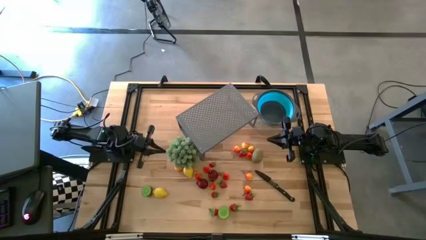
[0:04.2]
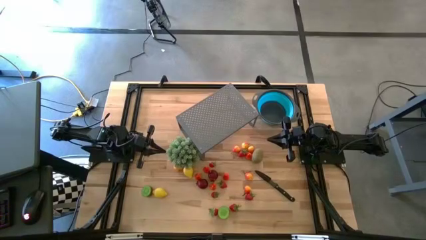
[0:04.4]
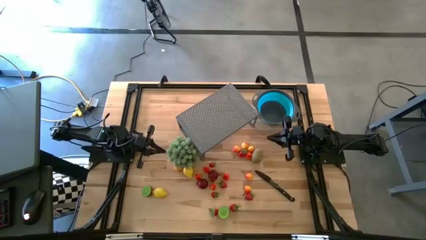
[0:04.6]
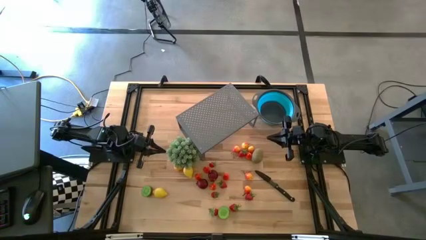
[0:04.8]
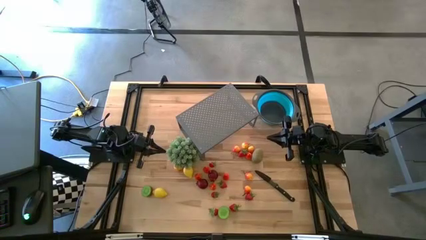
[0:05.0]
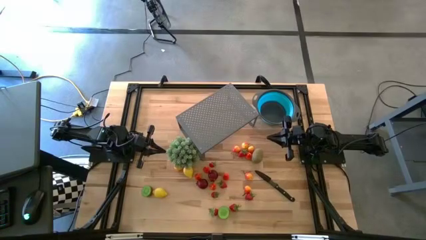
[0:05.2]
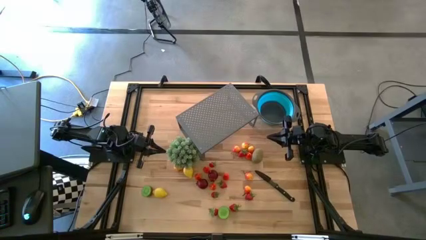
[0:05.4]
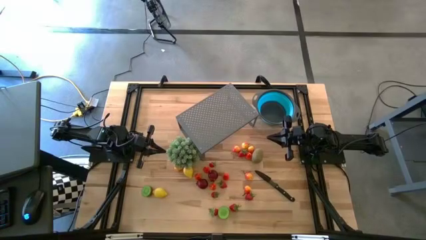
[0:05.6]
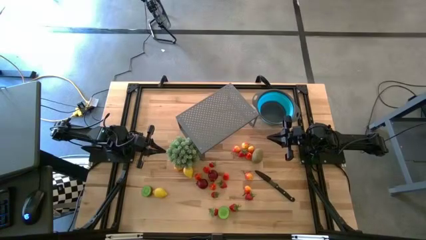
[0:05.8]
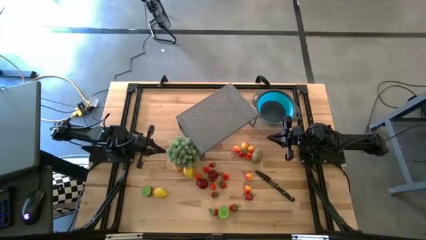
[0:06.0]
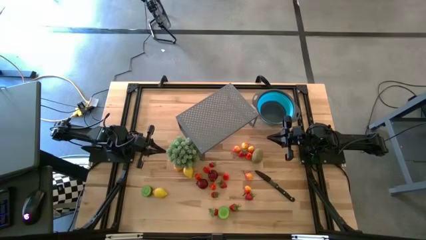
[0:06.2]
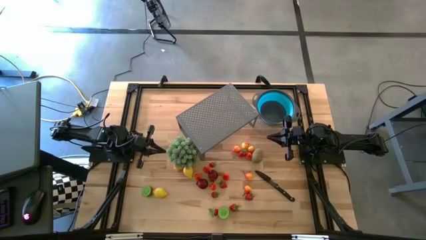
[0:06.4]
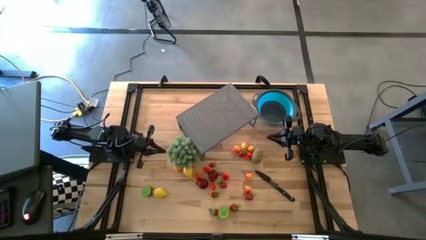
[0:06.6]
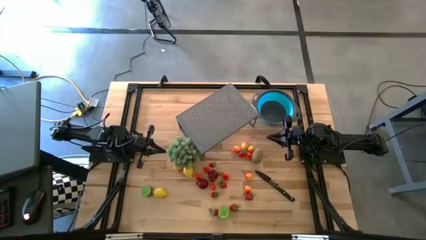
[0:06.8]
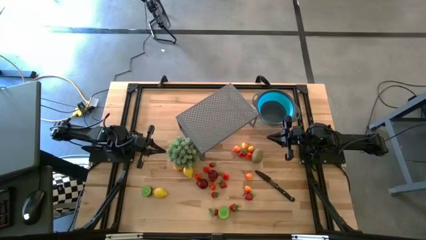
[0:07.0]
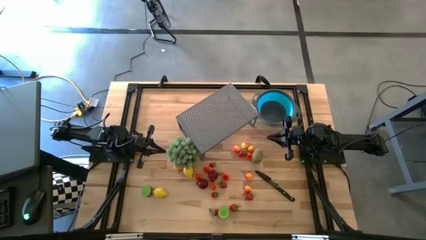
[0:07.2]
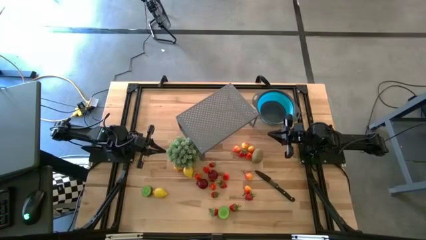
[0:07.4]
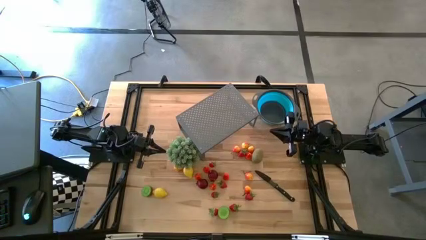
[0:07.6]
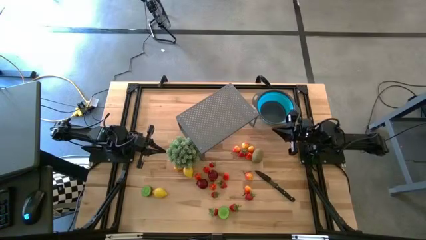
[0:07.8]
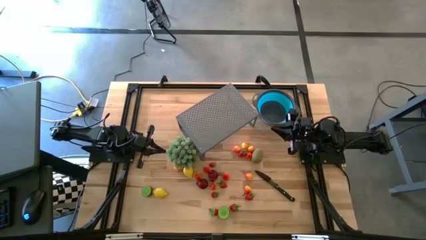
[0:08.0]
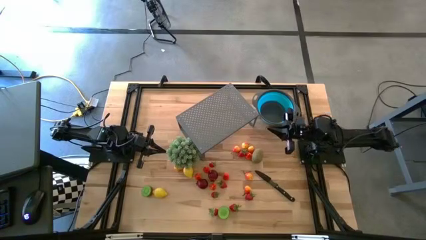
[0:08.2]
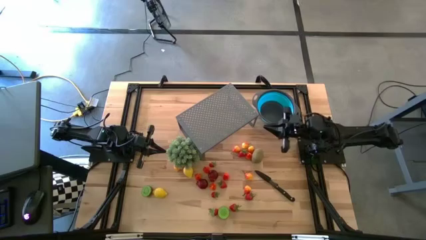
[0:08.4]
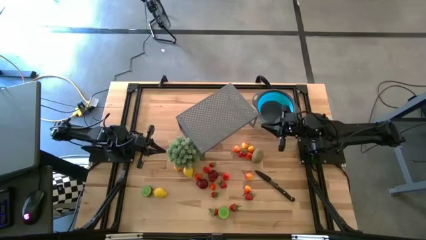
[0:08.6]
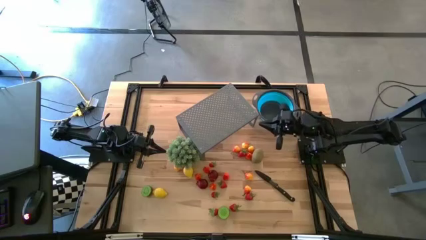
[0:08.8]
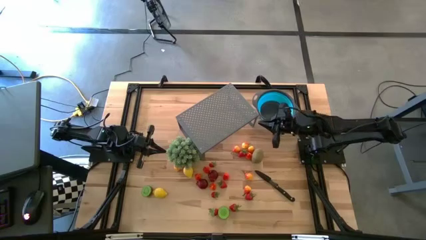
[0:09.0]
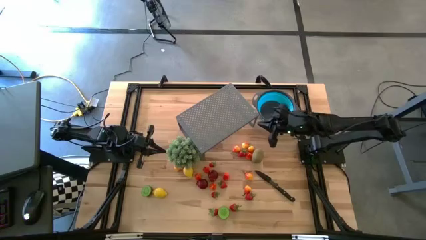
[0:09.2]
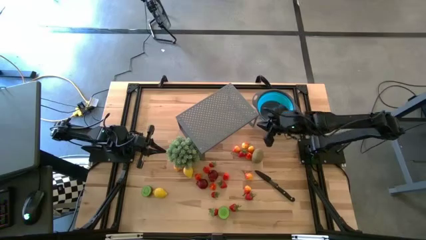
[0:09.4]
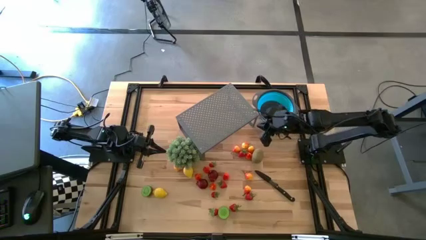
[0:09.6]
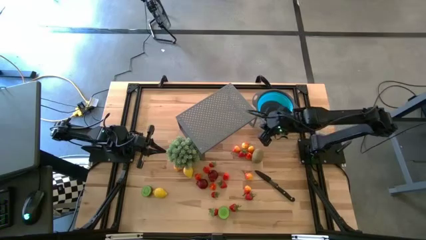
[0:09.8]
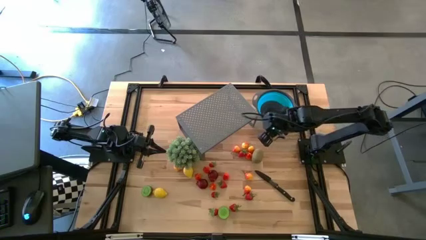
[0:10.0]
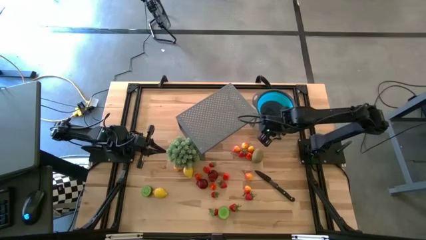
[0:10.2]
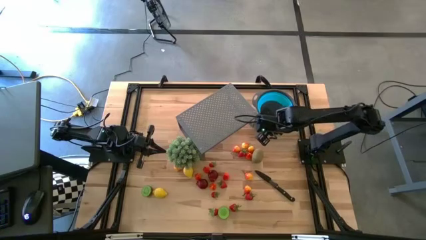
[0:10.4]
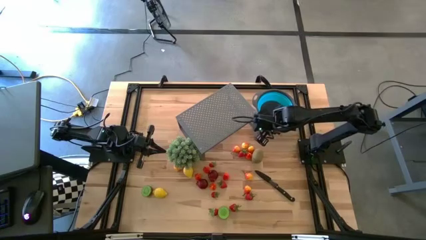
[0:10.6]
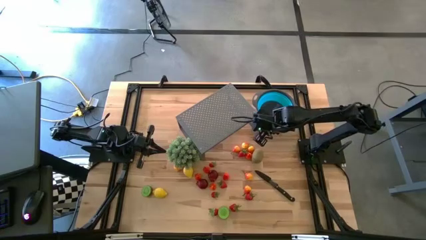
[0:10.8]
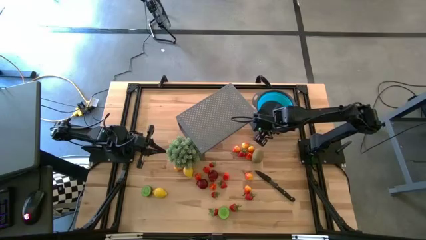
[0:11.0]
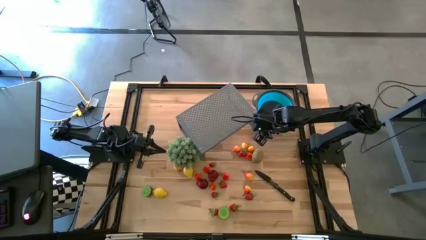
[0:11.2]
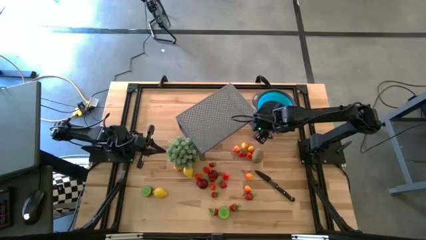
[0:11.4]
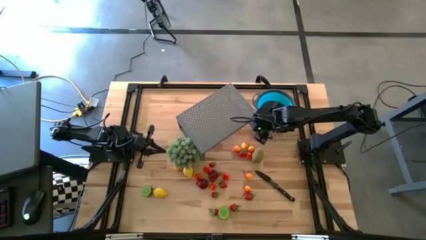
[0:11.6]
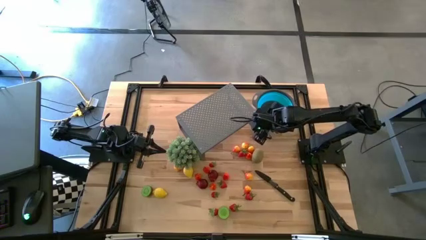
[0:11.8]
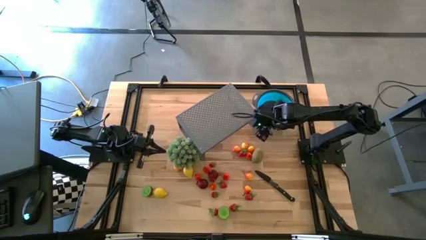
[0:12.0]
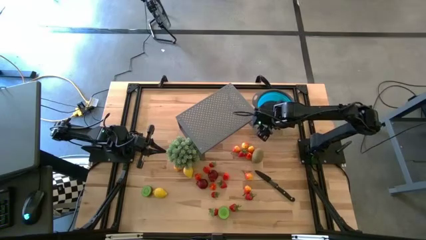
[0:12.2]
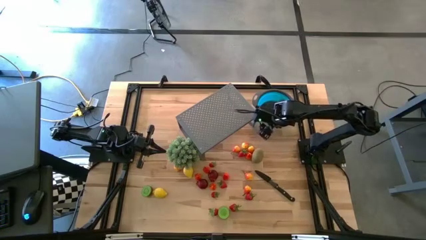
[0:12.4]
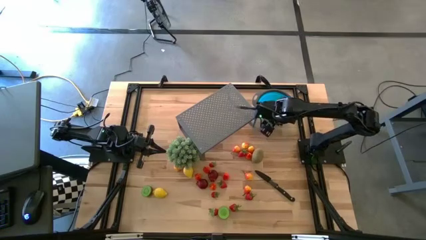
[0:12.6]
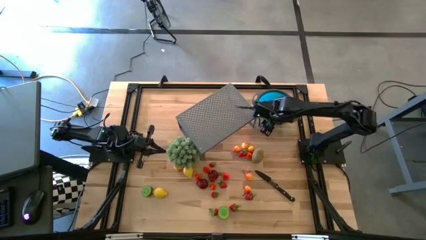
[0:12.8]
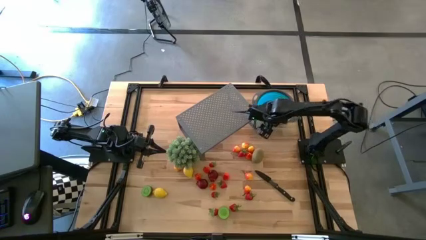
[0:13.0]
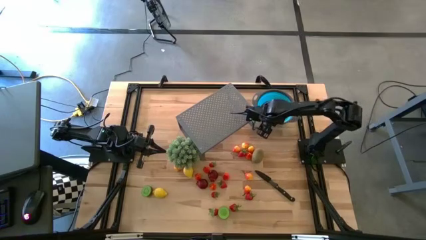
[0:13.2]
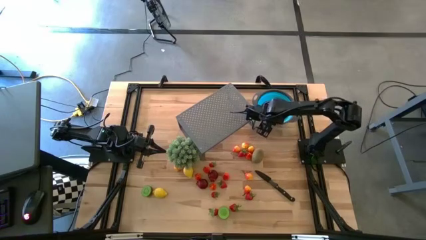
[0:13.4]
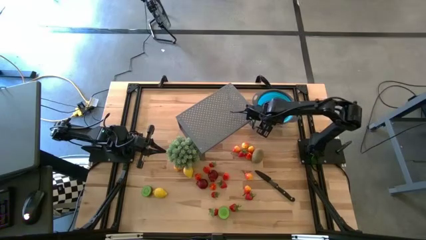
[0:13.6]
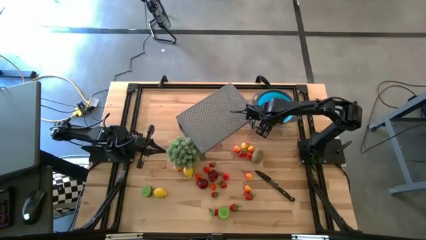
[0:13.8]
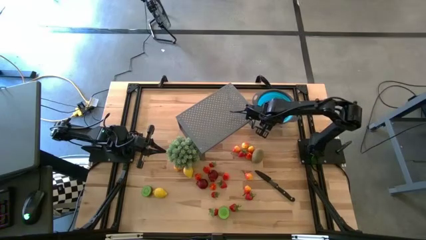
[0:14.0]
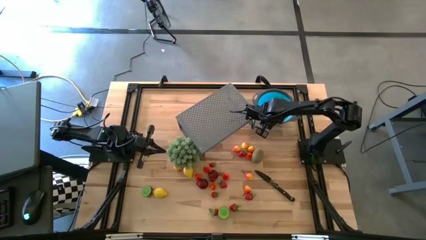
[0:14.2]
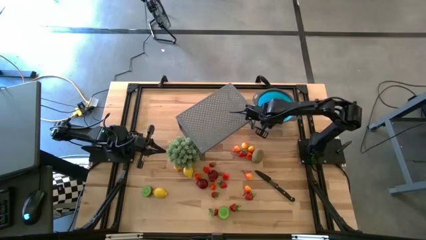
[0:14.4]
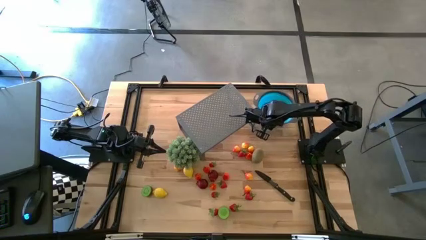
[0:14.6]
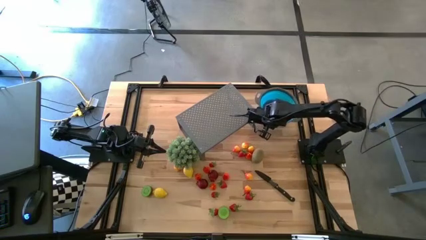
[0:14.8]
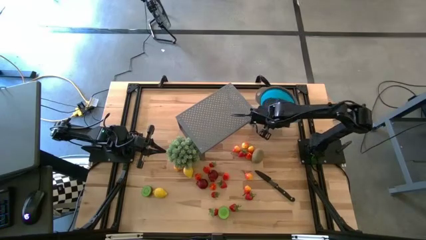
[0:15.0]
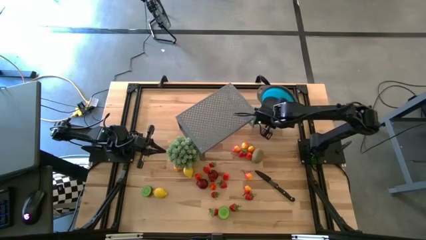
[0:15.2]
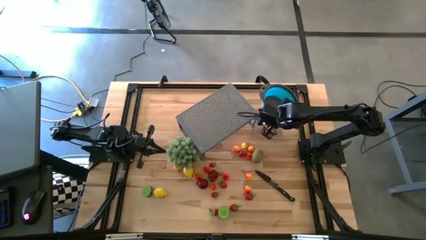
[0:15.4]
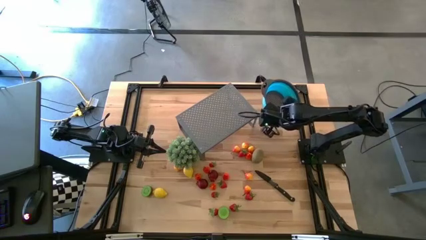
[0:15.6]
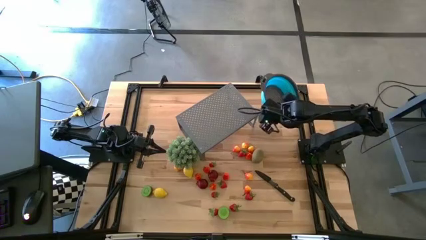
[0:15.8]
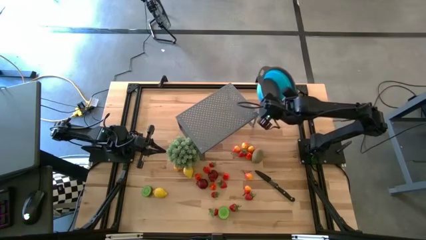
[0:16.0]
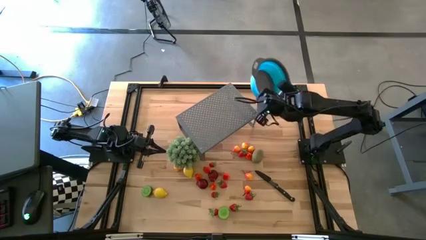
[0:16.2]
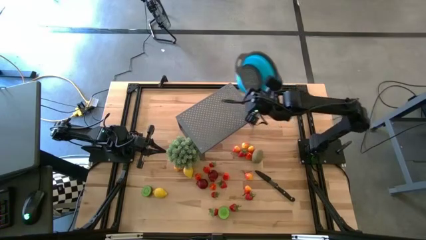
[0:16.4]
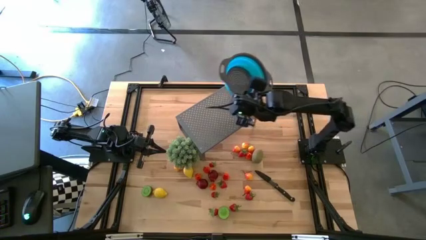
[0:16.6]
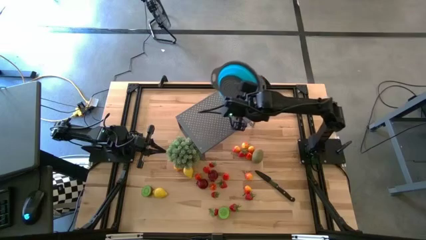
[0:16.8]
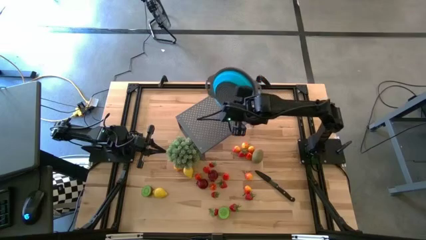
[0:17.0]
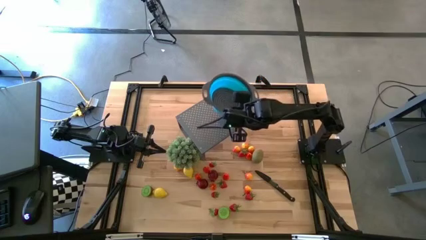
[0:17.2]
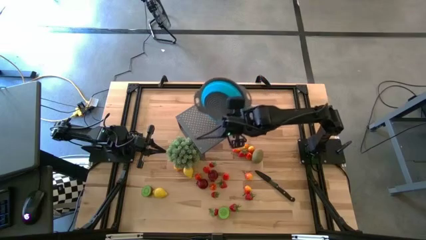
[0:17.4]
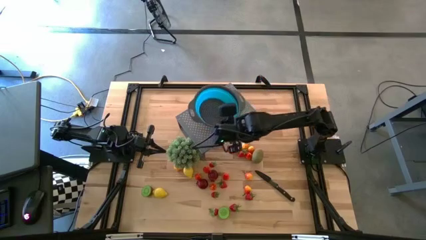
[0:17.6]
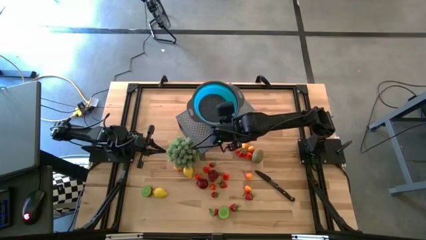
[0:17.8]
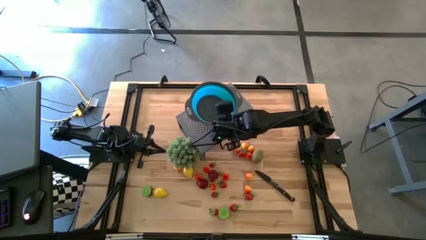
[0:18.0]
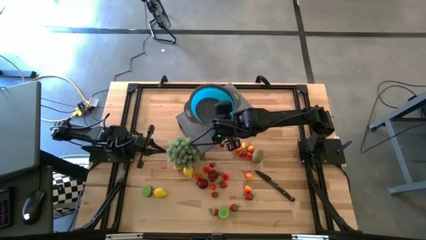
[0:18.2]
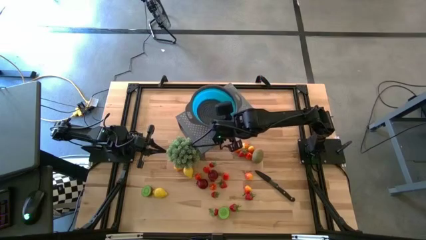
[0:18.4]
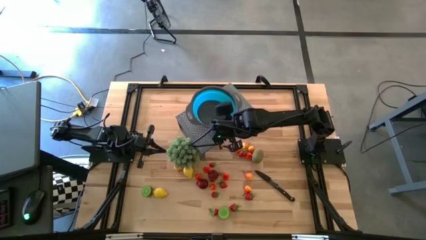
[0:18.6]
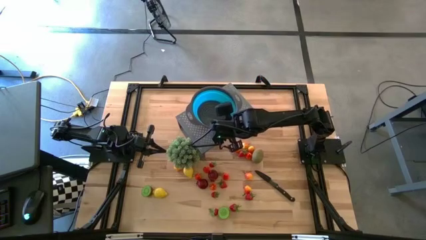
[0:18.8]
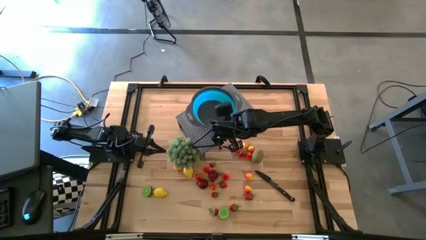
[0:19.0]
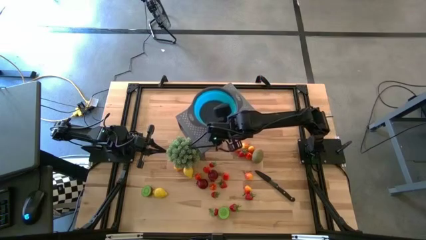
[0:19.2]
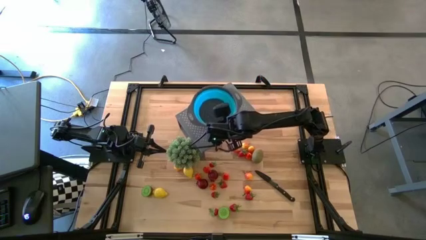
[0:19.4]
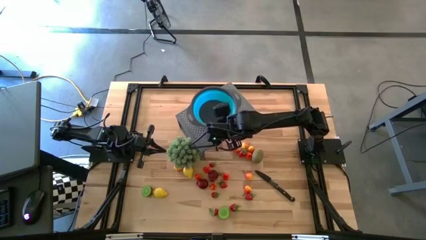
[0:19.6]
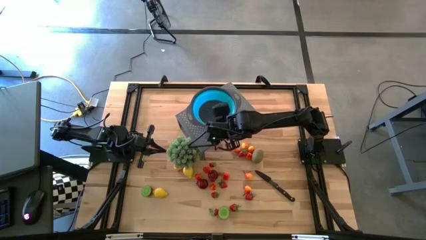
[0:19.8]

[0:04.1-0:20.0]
Task: Pick & Place Fruit
Put the blue strainer bowl on the shelf
